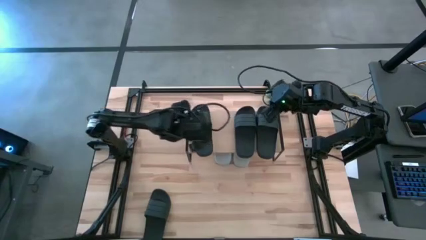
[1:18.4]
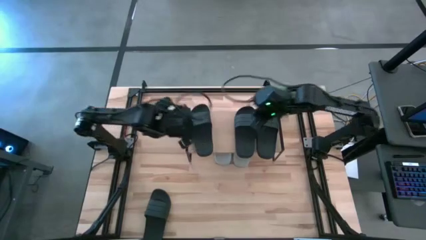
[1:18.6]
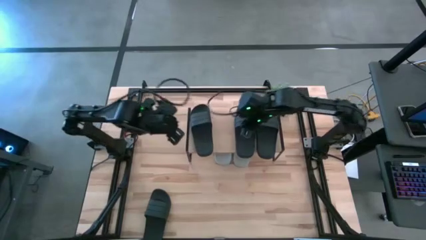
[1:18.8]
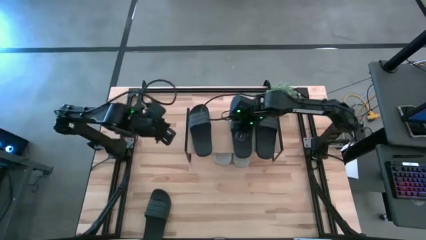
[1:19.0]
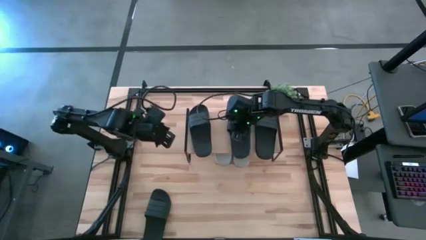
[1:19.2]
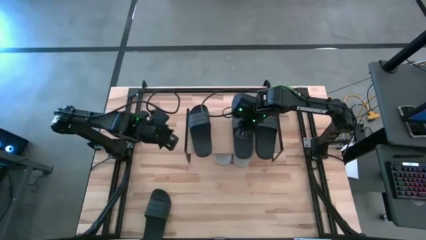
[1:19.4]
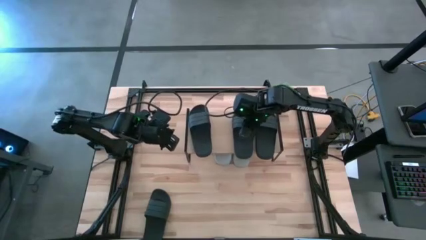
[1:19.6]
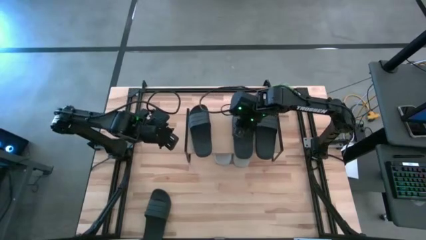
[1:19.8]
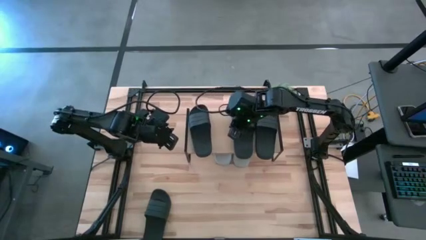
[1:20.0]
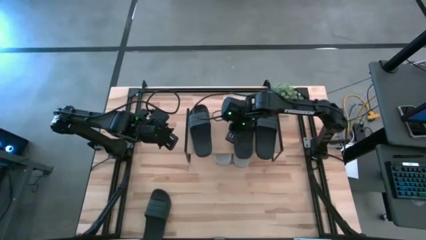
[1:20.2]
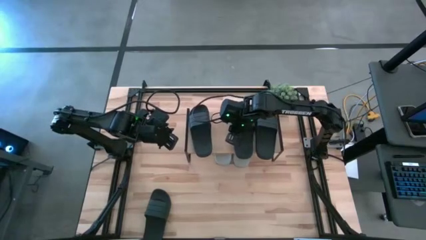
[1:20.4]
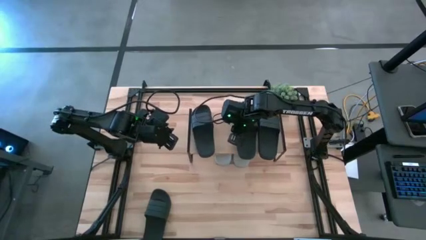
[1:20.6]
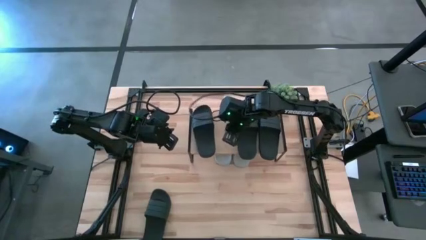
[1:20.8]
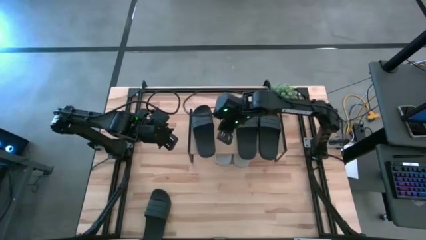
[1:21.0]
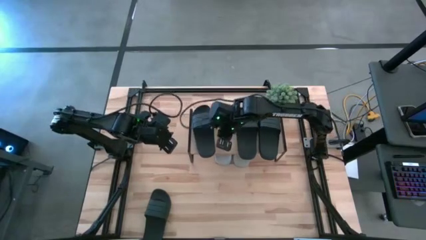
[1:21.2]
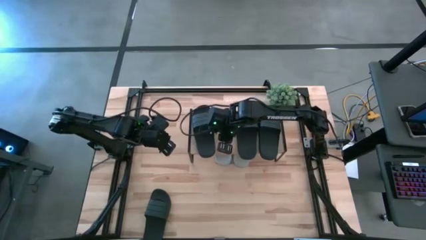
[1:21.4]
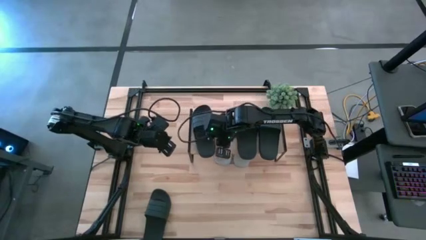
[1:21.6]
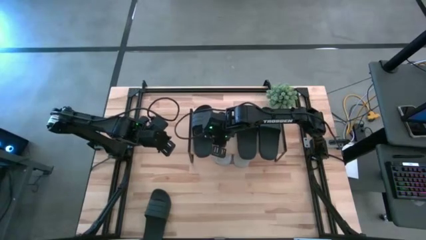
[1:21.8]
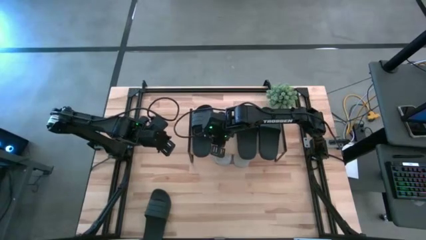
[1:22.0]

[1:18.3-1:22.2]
Task: Pick and place slides into the shelf
Adjust the black slippers on the shelf

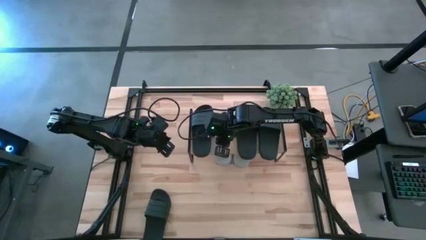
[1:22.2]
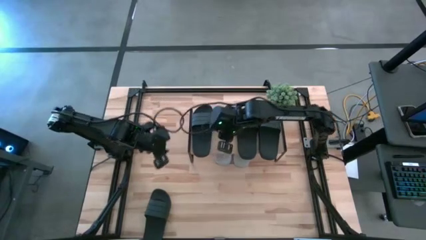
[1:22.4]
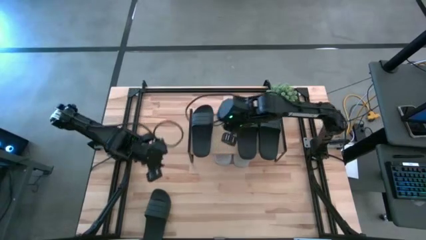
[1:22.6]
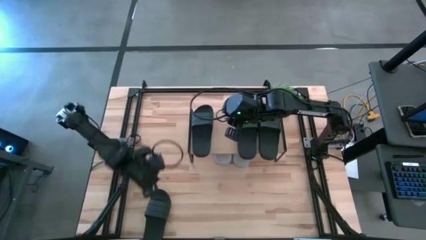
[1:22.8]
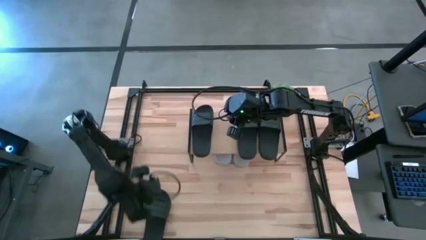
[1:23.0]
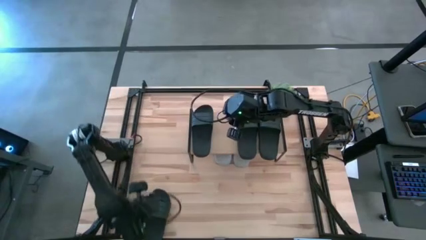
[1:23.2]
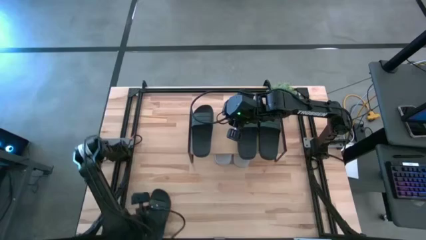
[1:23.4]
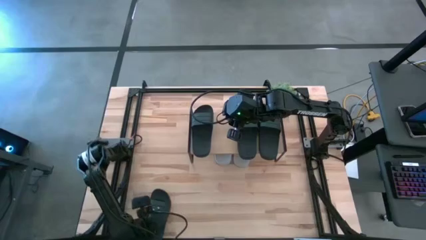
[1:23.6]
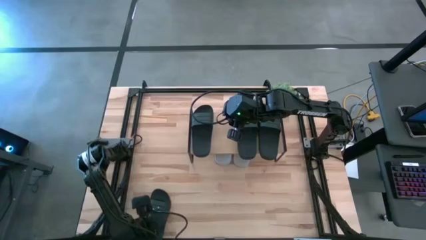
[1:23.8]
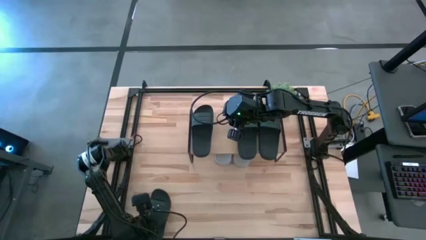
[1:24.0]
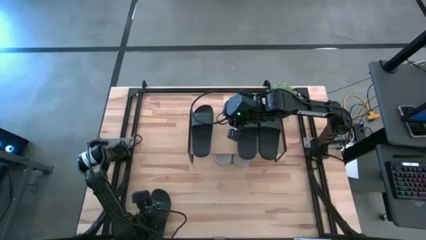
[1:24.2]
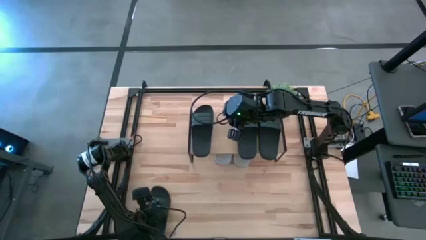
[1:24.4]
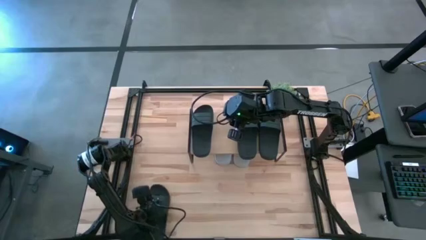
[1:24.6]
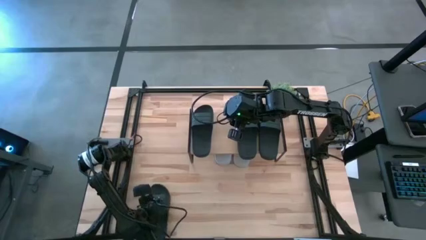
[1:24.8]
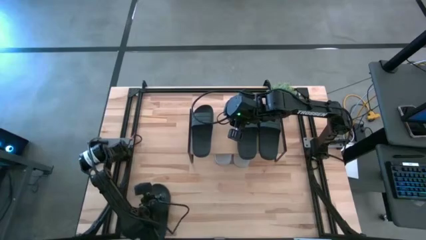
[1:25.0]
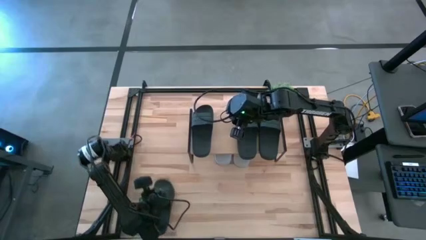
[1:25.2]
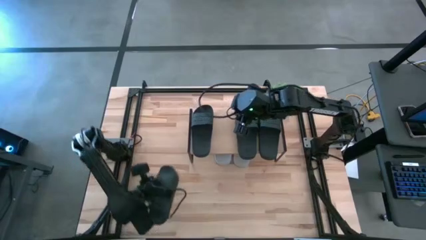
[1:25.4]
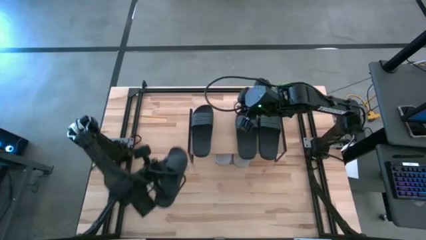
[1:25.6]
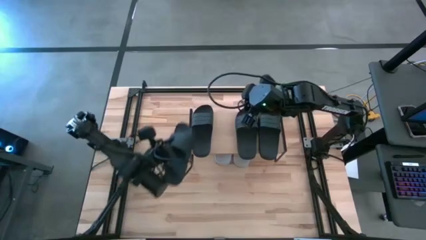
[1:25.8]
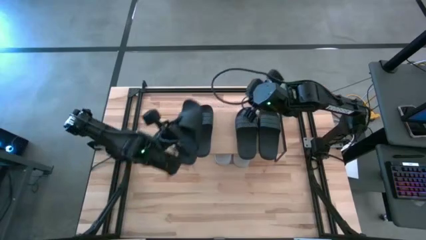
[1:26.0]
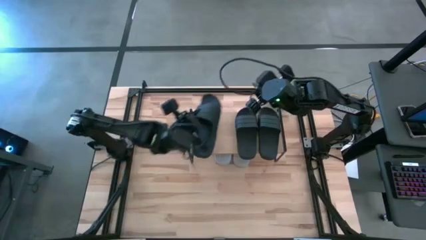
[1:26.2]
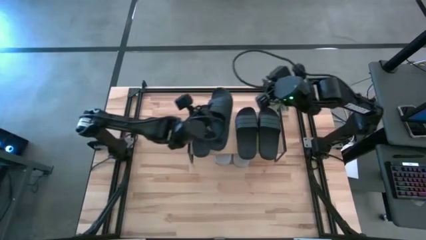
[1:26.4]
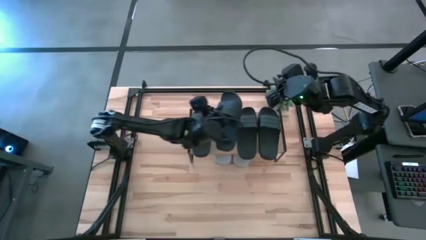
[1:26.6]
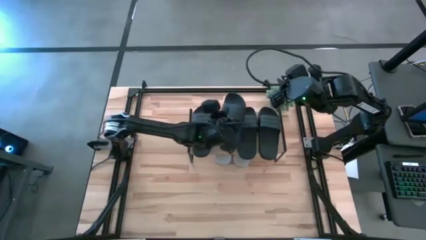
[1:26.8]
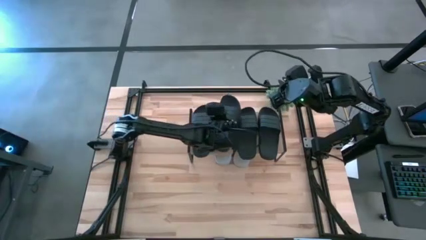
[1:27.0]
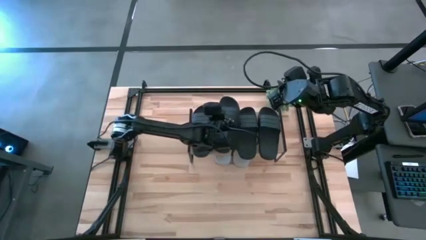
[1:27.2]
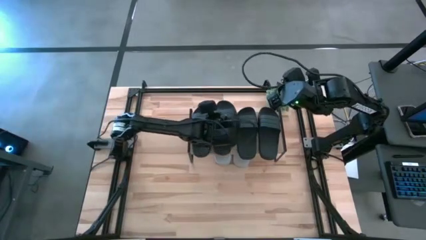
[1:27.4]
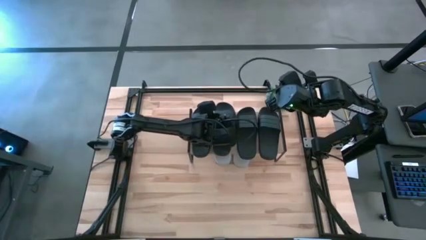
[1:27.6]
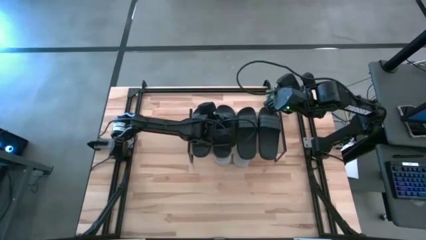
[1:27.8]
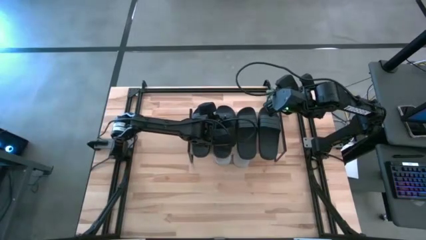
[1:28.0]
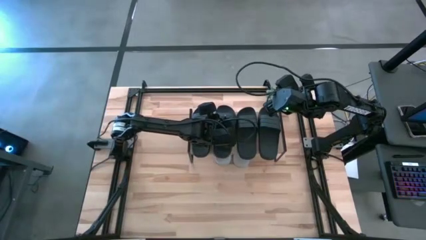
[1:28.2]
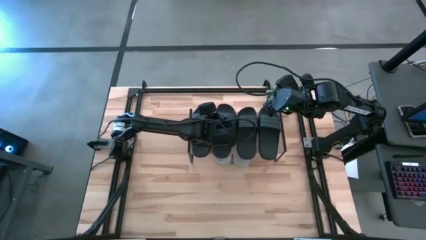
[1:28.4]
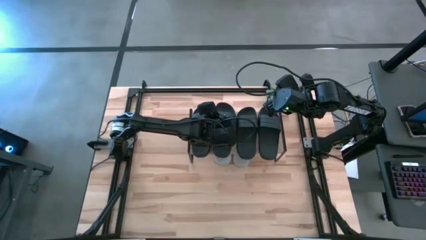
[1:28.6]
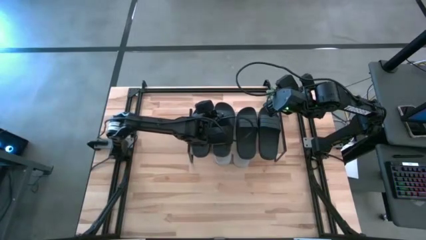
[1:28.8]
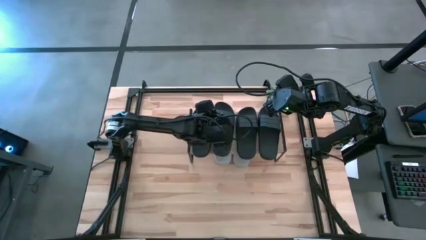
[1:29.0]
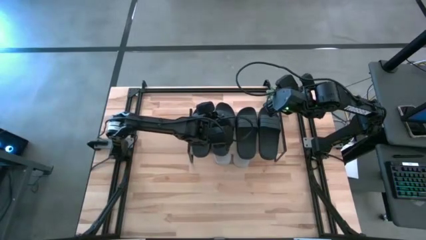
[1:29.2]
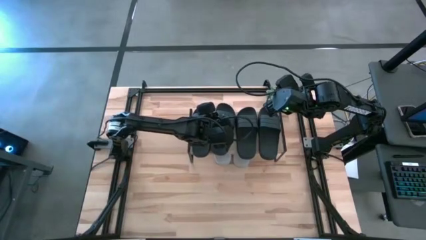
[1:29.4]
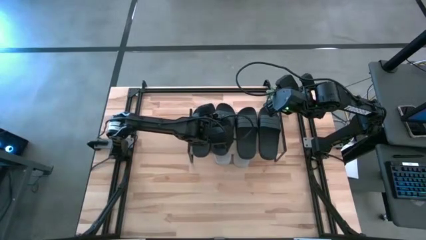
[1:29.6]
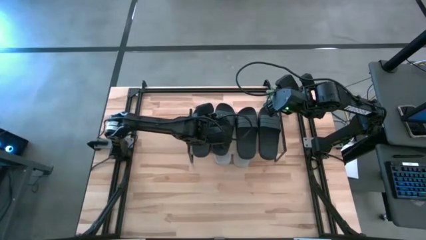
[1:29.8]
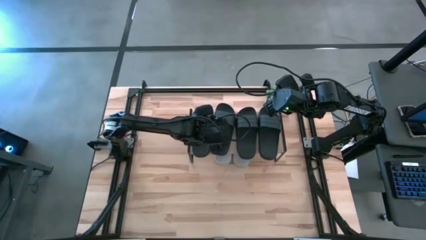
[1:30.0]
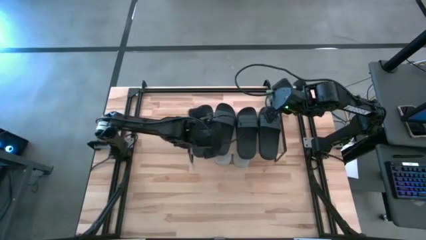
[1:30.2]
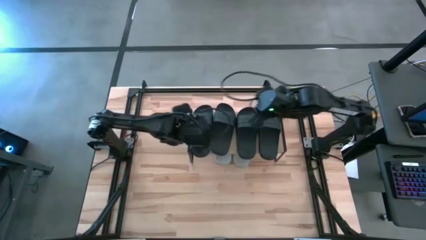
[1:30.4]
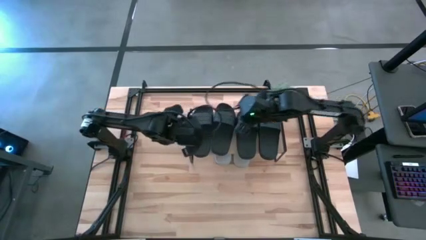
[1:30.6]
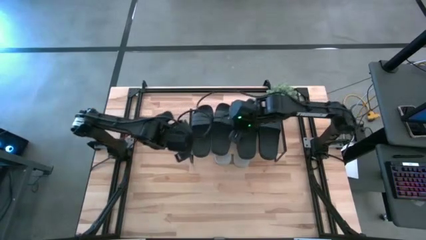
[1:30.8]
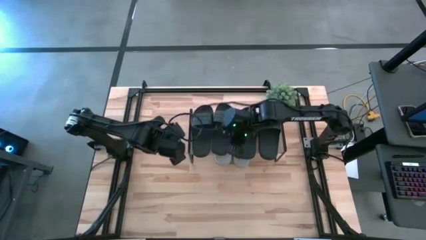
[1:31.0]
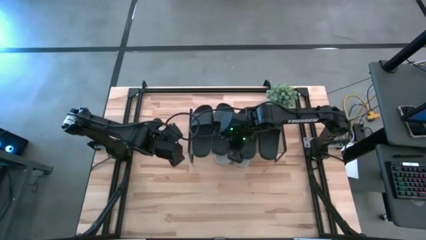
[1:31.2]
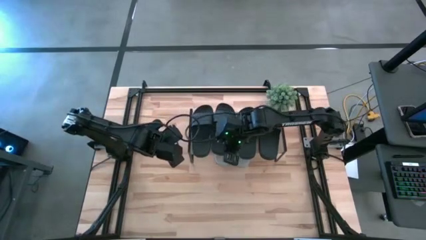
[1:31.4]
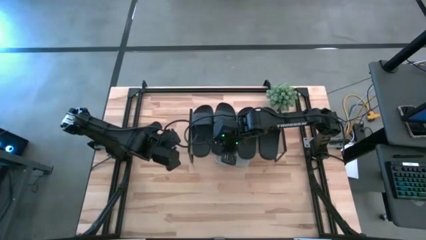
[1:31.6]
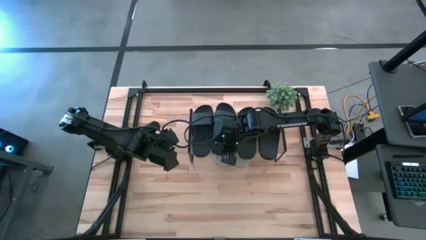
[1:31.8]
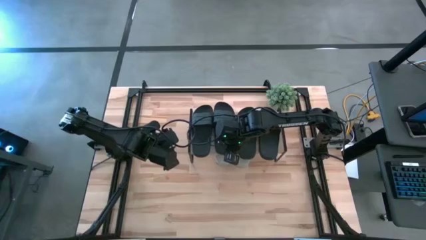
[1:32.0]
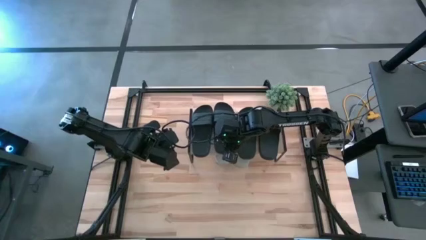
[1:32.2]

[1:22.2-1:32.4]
Put the black slipper on the shelf

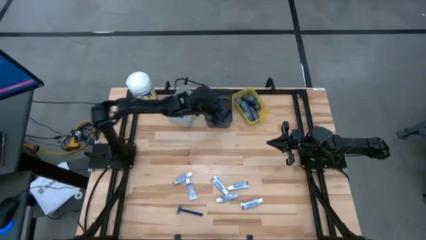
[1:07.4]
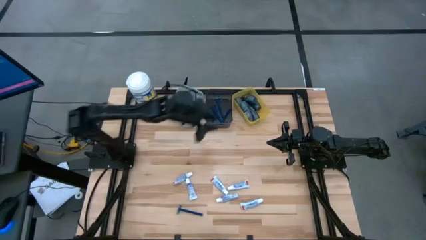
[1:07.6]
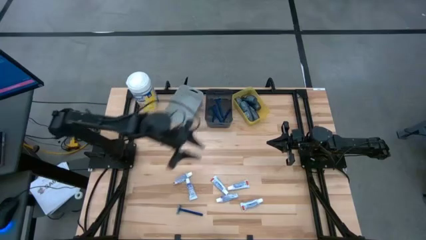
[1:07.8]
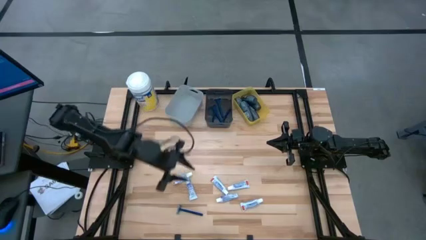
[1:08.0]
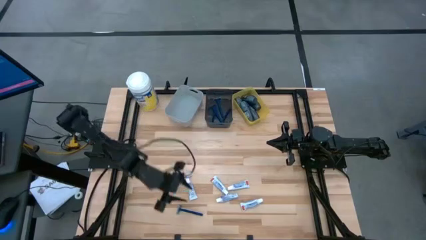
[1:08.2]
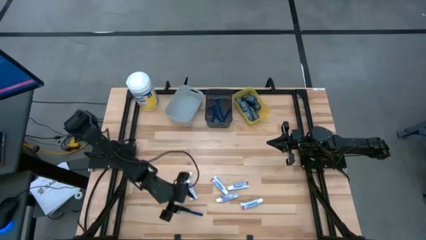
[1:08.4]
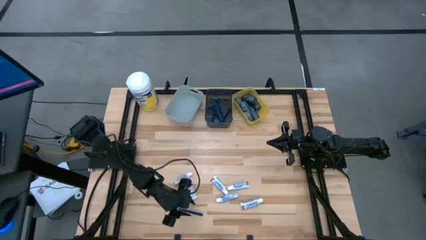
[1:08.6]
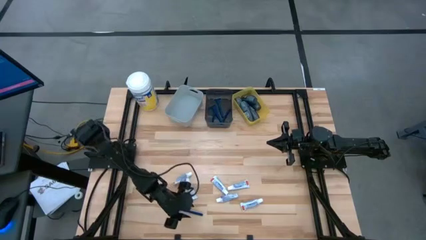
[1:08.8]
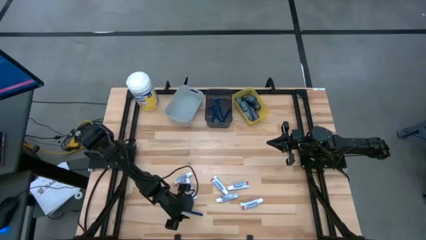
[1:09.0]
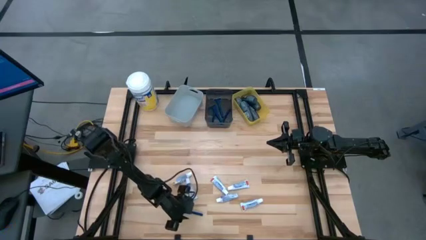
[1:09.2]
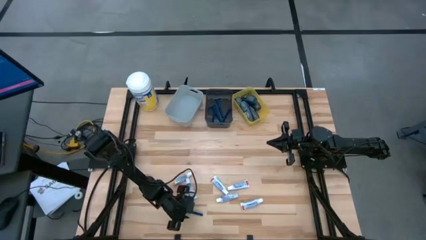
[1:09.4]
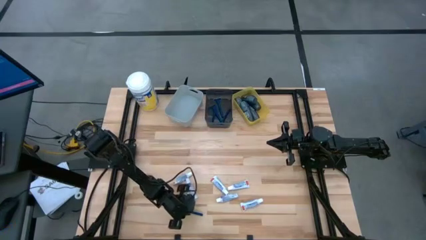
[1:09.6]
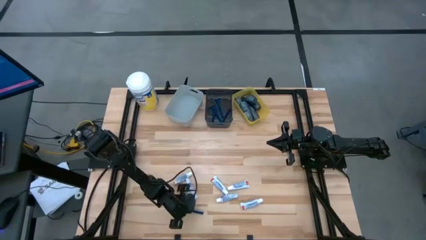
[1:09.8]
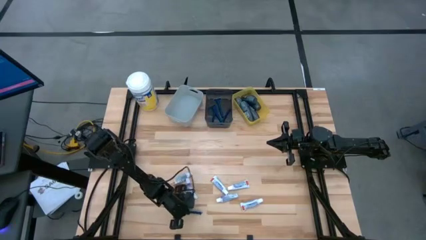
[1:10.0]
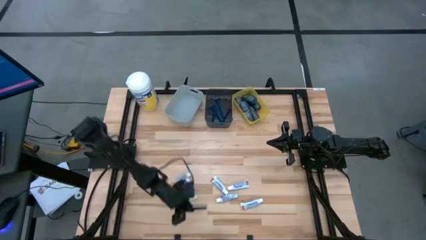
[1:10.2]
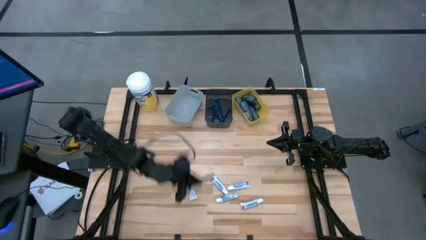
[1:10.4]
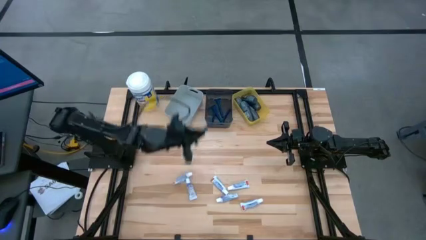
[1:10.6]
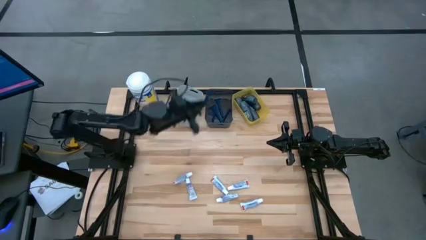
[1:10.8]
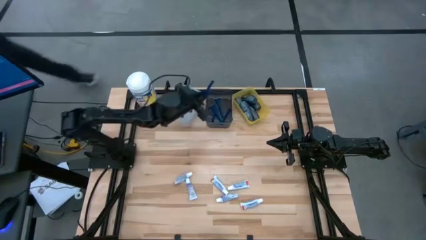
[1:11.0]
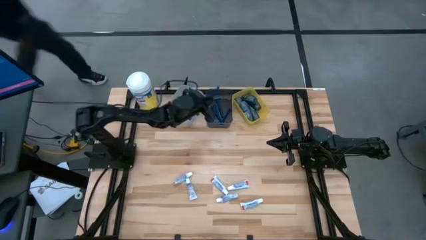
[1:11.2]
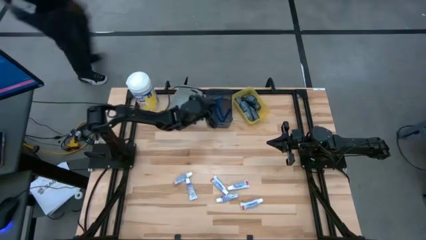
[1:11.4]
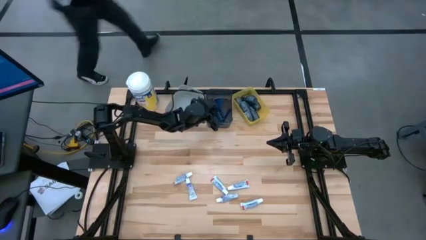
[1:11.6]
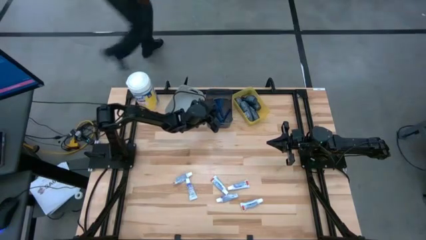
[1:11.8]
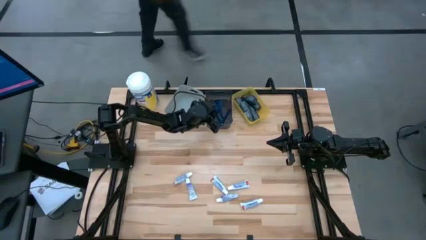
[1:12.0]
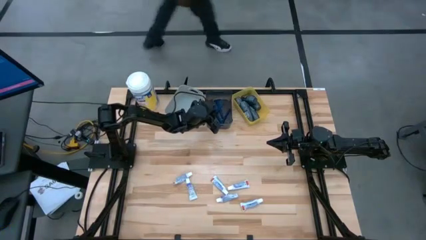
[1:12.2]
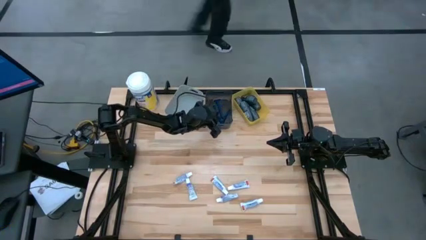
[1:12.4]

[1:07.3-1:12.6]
Task: Pick & Place Travel size toiletries
Put the razor into the black bin
